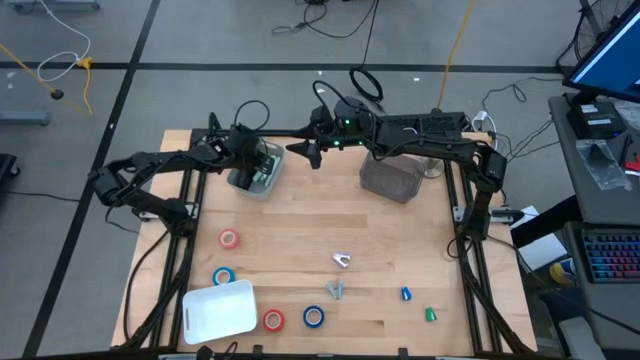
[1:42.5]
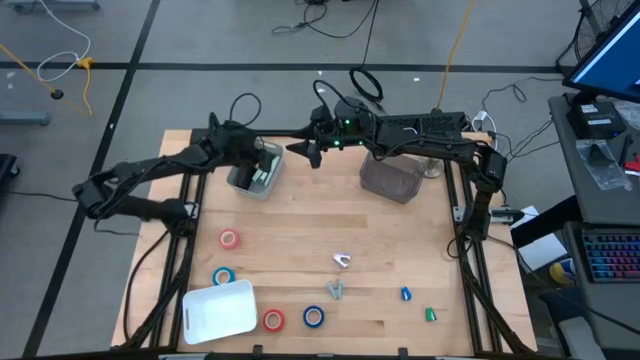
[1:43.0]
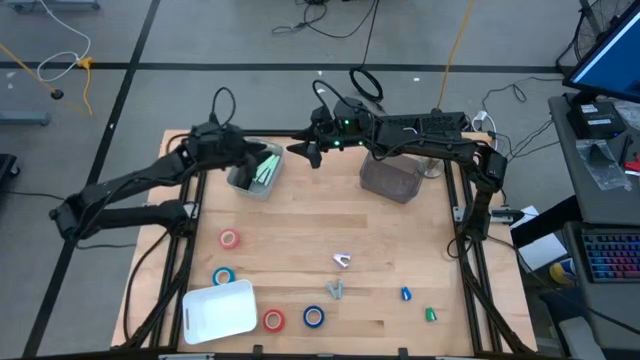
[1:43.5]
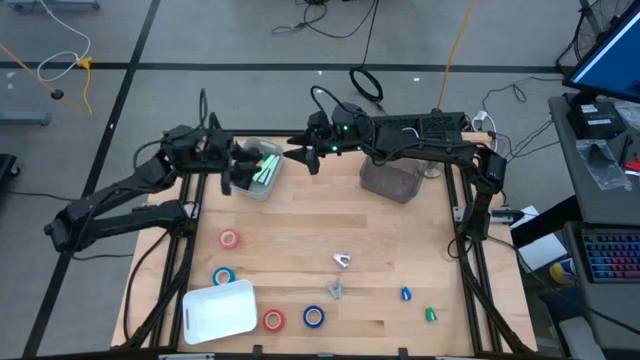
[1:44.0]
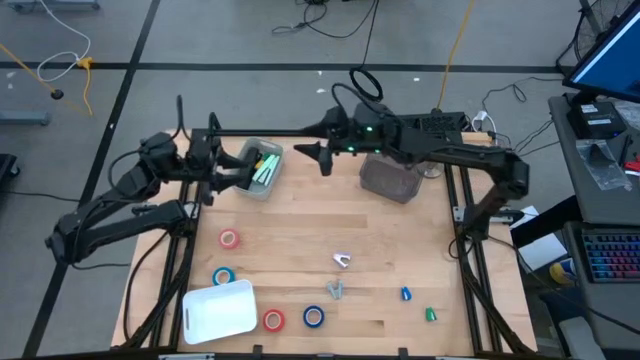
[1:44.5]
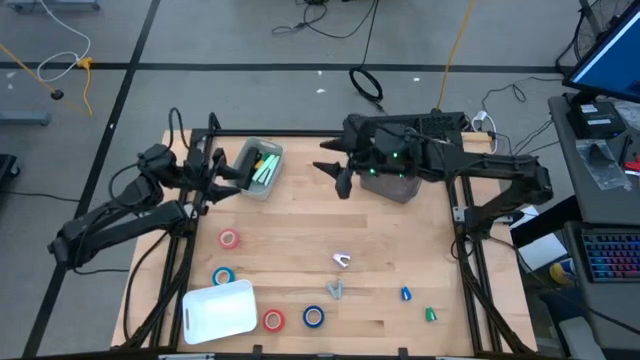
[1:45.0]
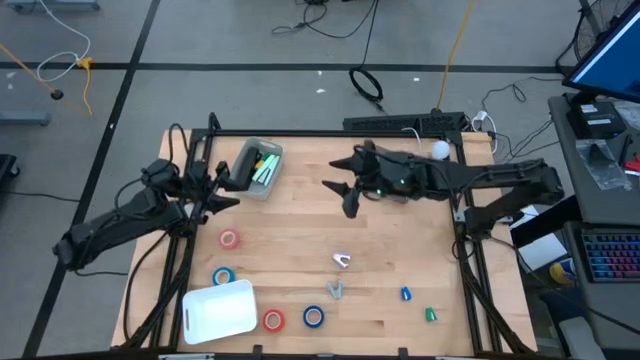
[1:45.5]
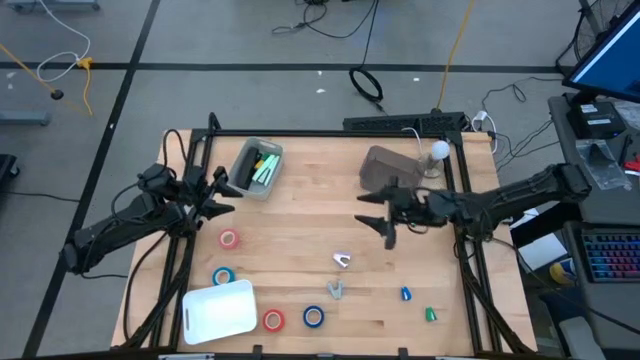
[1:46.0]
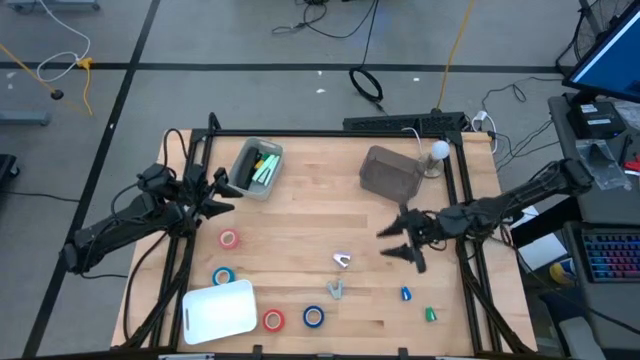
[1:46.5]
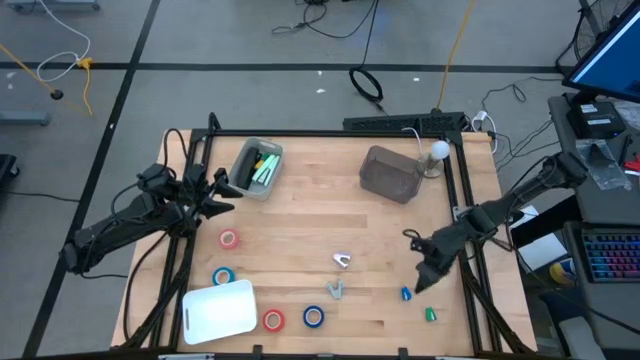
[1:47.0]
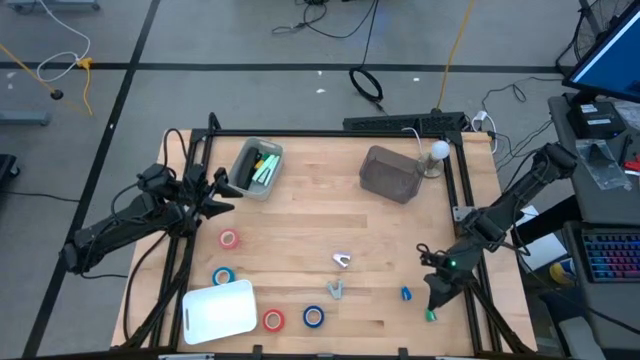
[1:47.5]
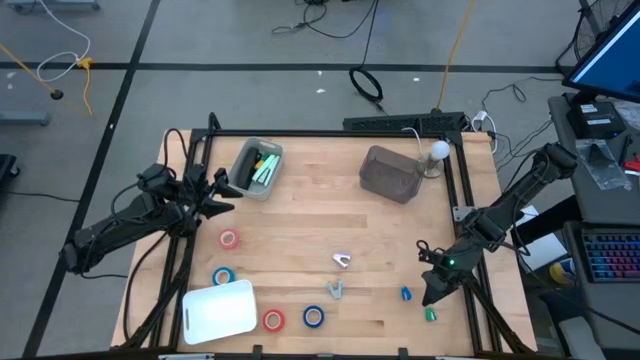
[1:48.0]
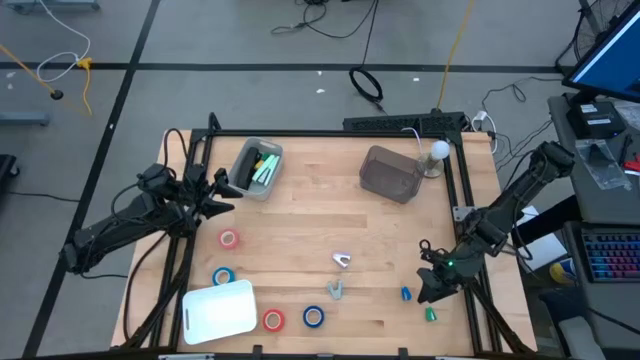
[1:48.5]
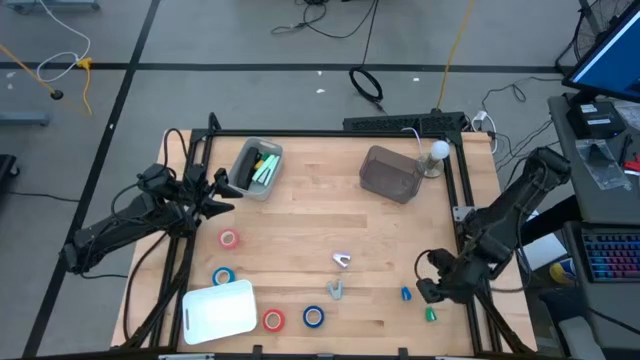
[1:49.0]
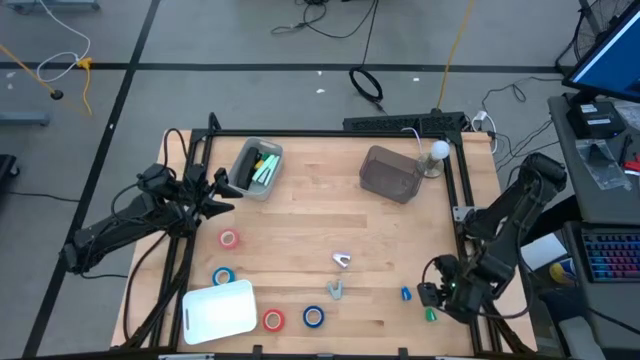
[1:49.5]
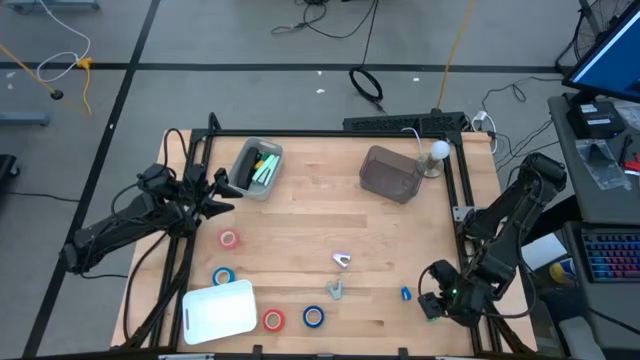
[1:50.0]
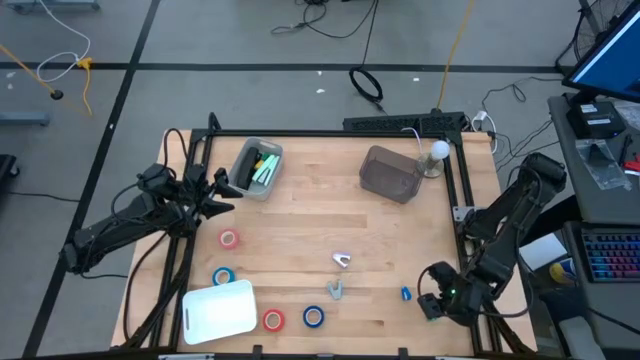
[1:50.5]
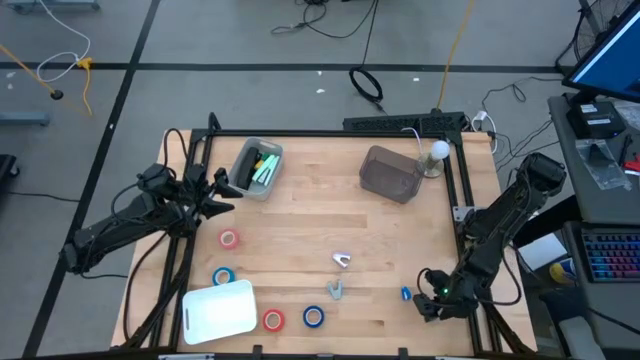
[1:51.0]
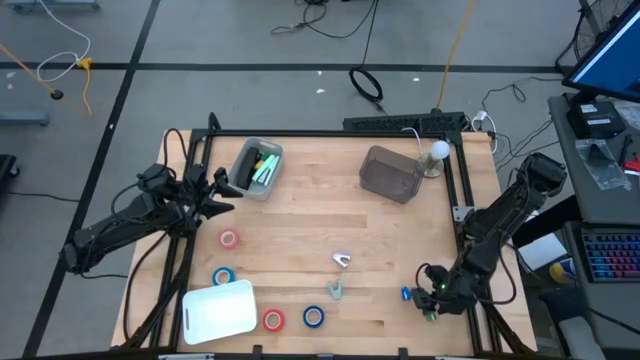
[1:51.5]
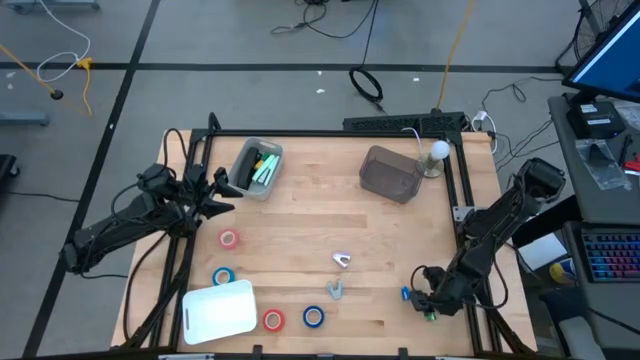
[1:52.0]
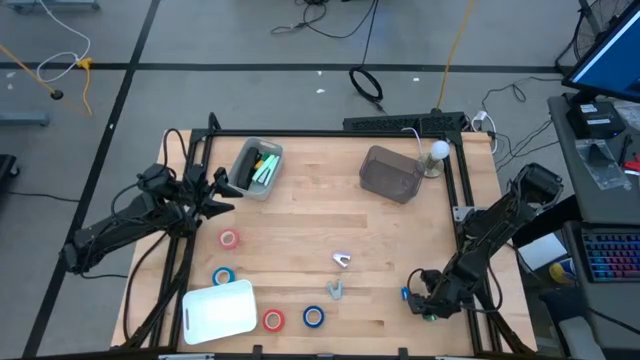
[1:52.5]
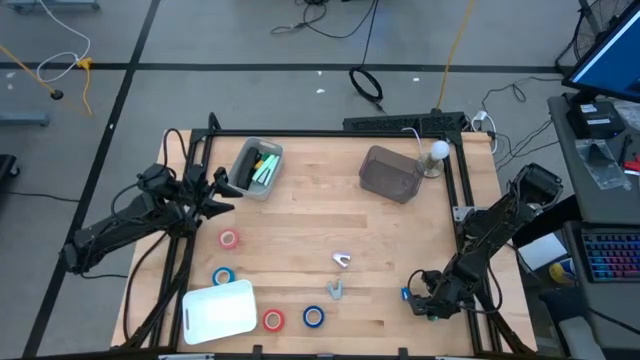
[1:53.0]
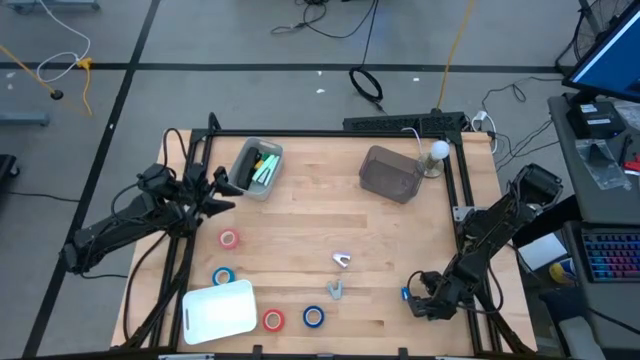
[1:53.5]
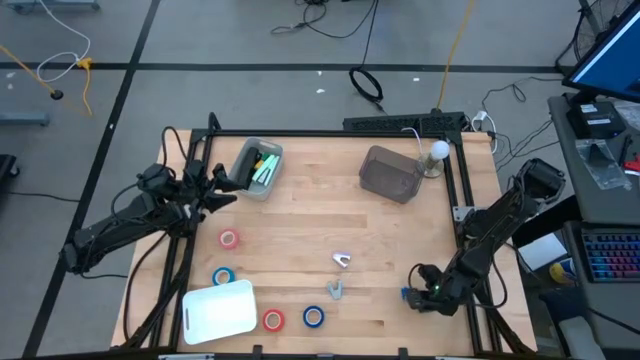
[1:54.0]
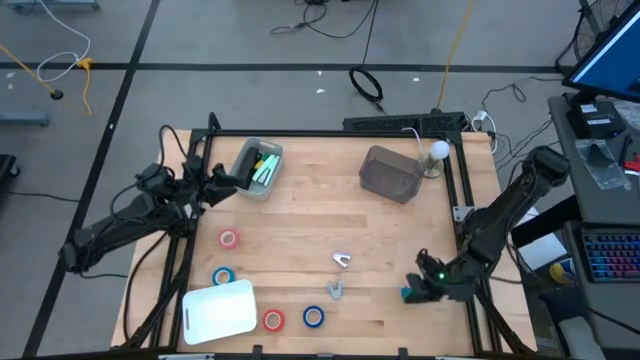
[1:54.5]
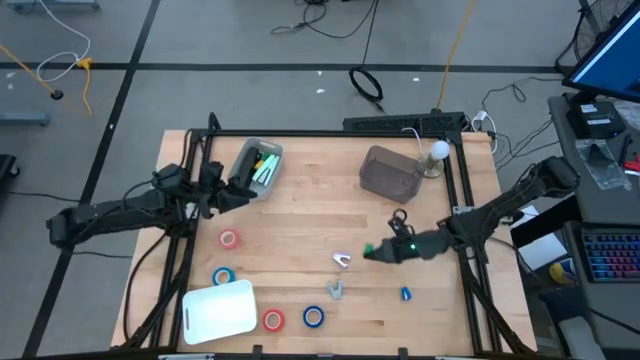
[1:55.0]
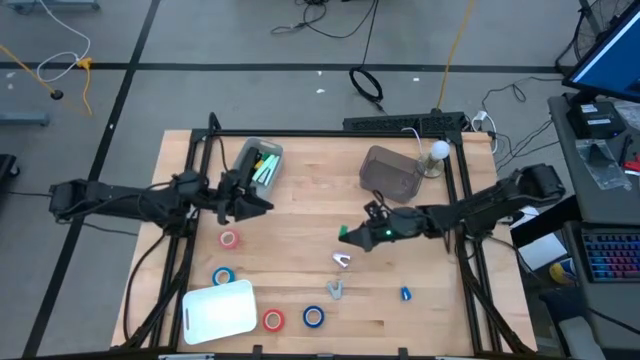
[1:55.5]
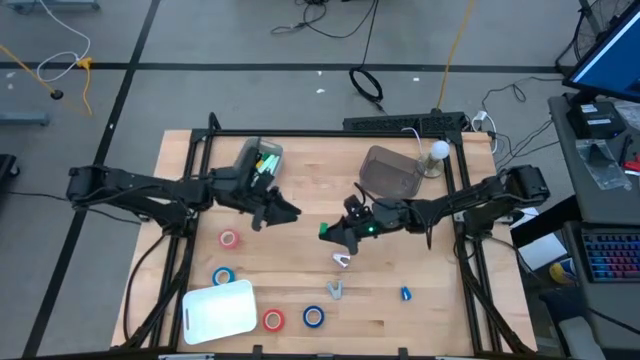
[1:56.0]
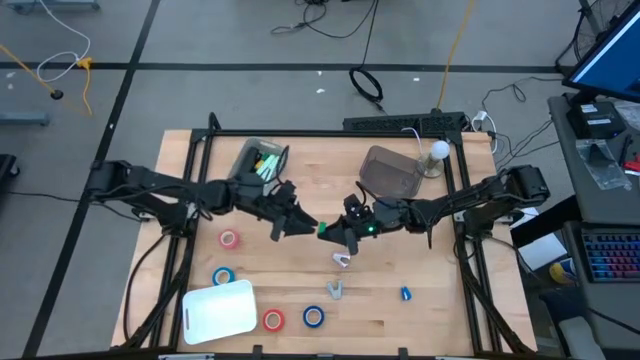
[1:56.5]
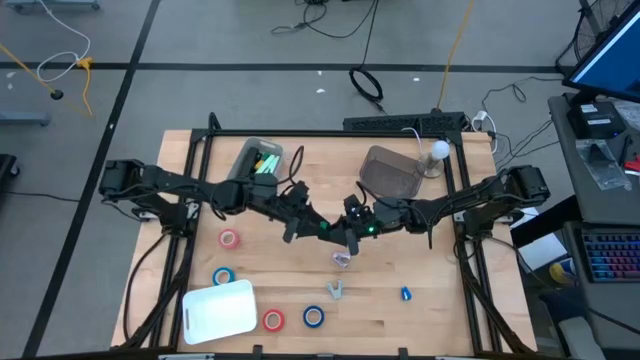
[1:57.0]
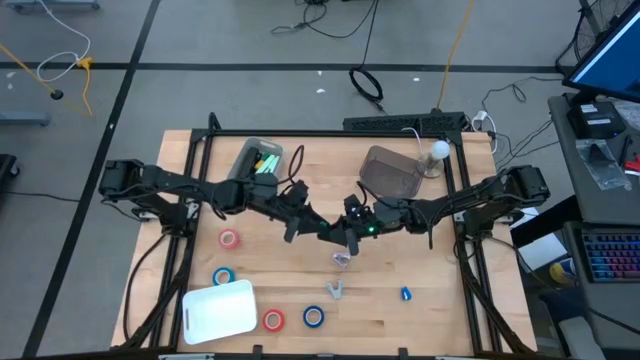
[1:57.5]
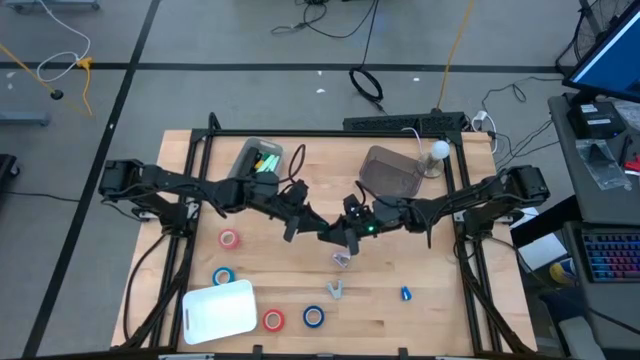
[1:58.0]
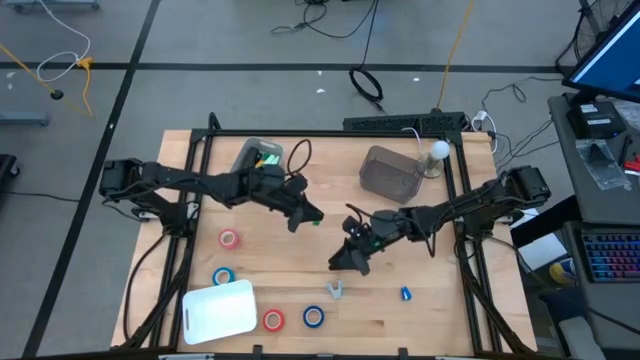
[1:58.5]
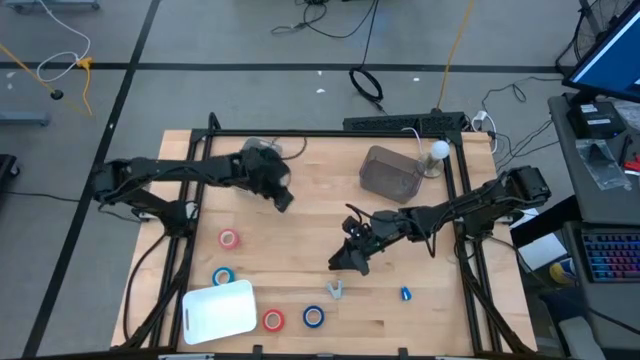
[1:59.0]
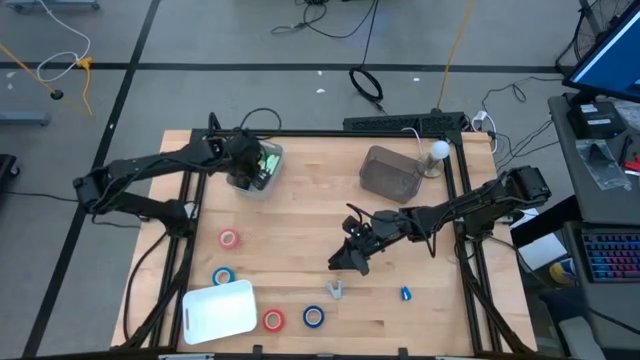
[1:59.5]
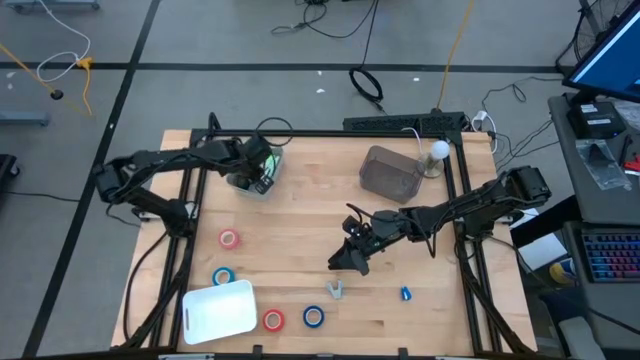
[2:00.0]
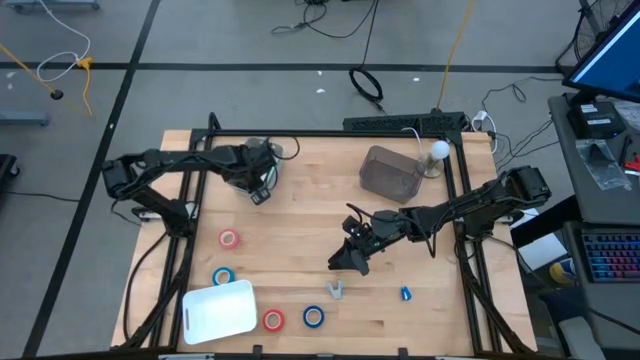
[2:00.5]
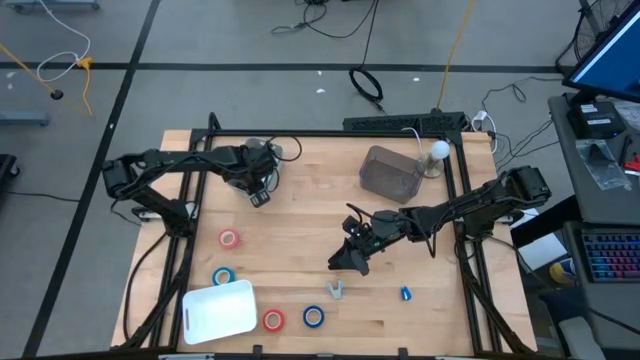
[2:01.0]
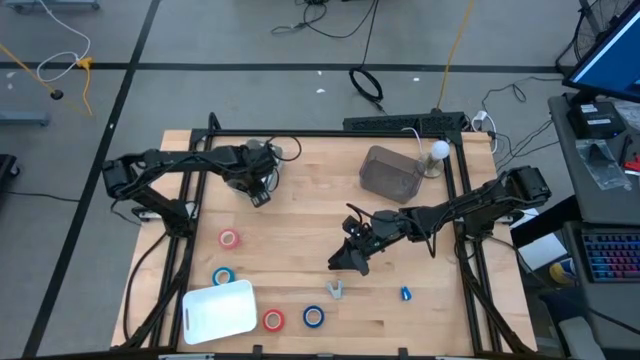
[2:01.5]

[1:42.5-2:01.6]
Task: Pick and place Stapler, Stapler remover, tape
Put the green stapler into the gray bin

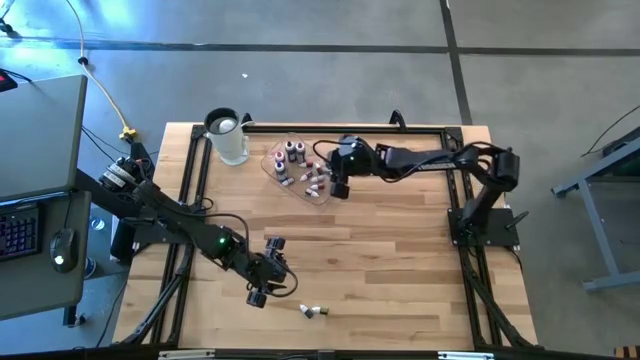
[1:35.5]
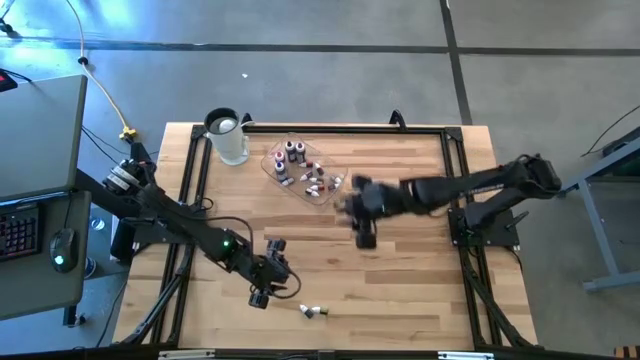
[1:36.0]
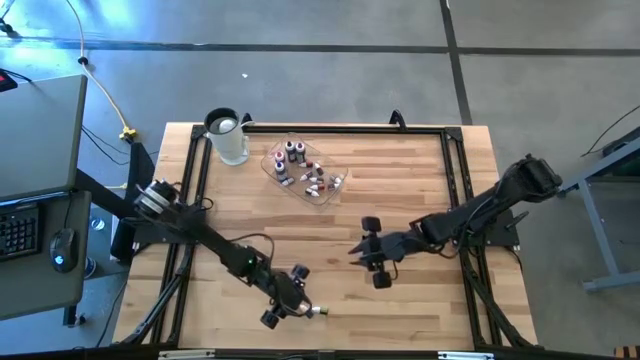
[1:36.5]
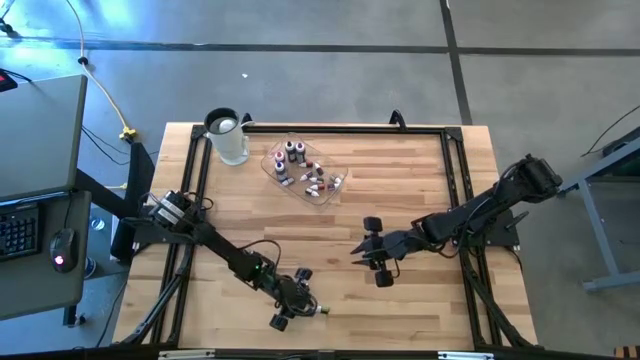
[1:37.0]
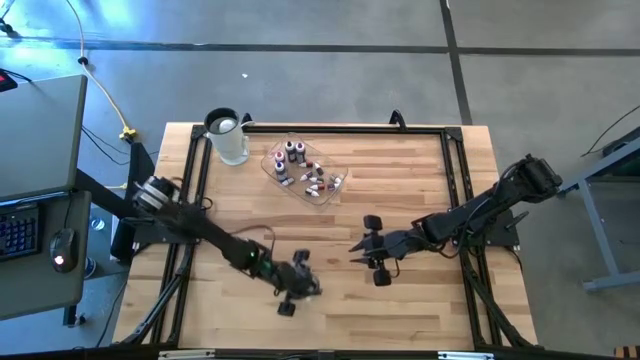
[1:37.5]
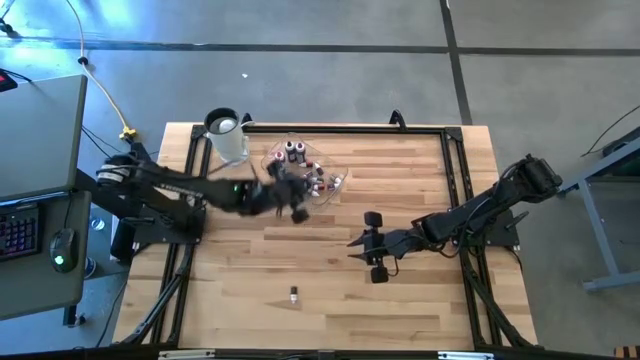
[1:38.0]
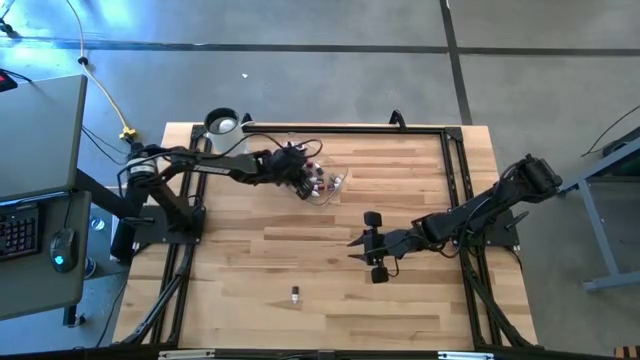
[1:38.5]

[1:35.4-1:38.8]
Task: Pick & Place food coloring
Put the small black food coloring bottle into the bin
